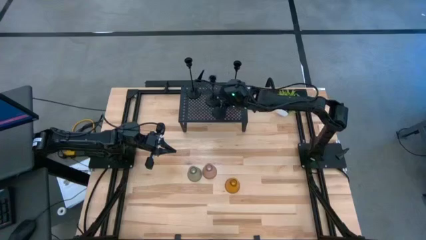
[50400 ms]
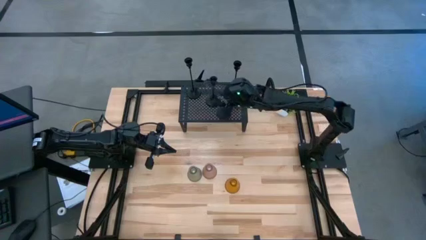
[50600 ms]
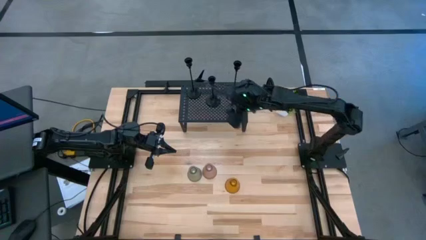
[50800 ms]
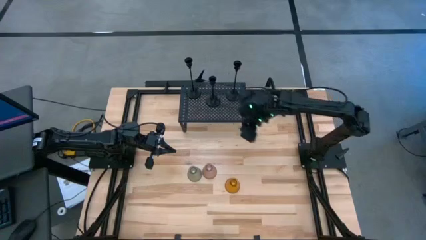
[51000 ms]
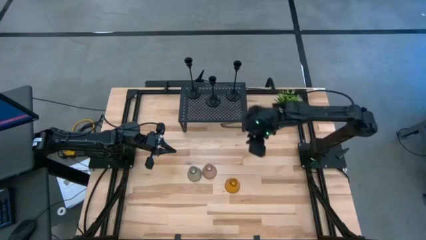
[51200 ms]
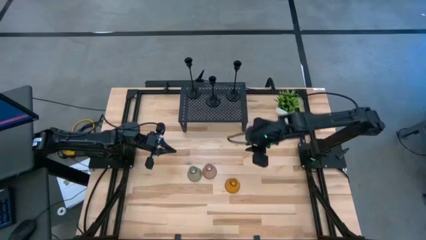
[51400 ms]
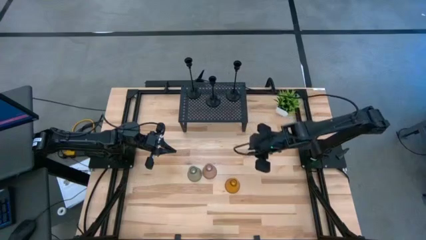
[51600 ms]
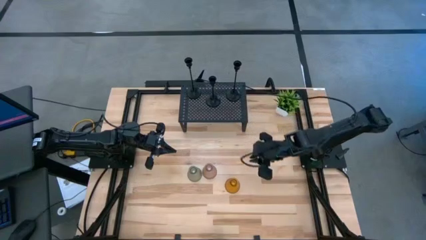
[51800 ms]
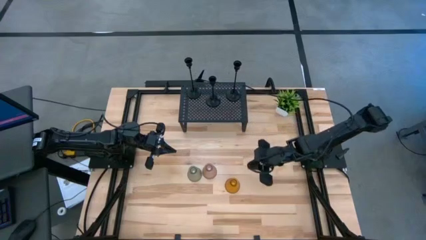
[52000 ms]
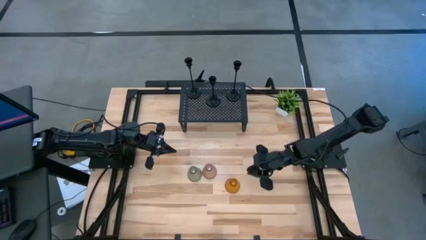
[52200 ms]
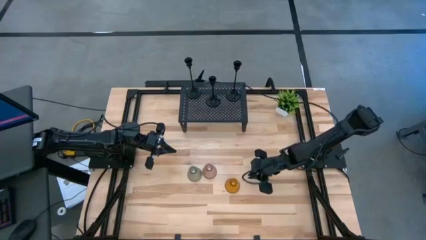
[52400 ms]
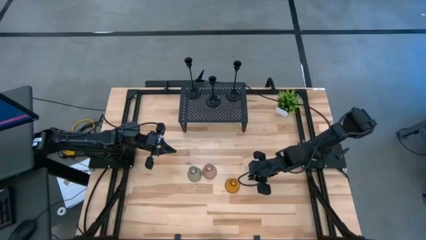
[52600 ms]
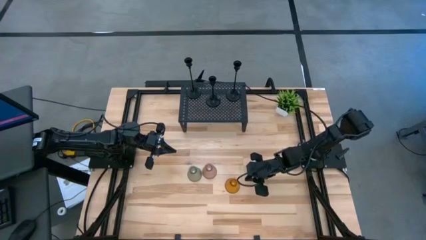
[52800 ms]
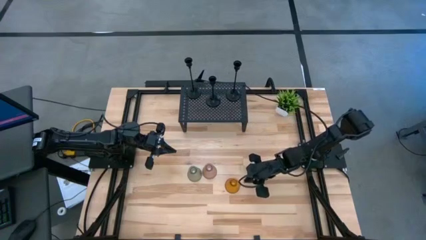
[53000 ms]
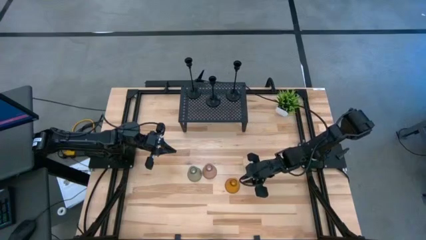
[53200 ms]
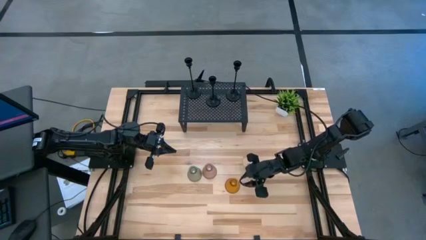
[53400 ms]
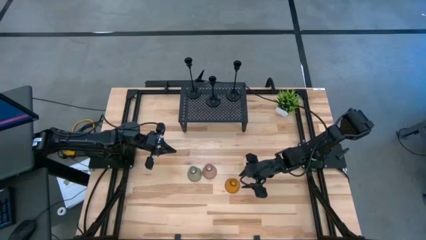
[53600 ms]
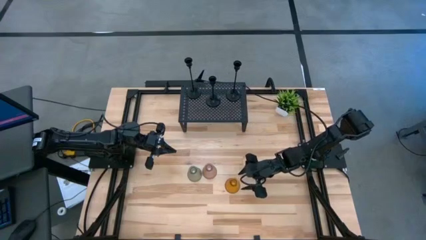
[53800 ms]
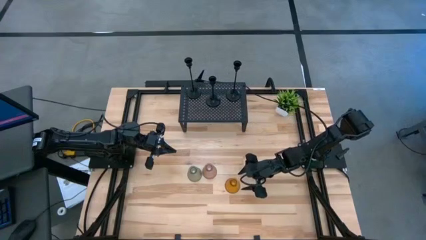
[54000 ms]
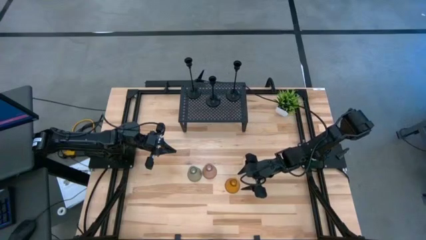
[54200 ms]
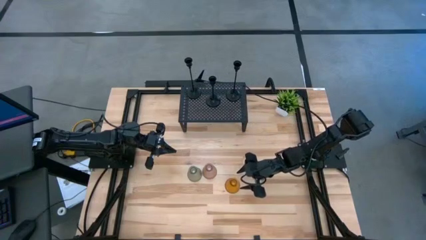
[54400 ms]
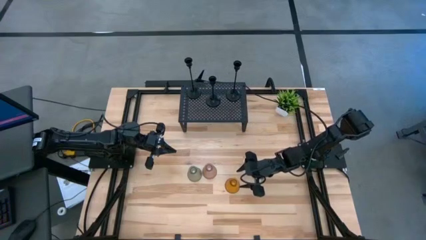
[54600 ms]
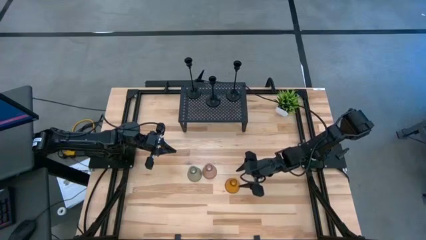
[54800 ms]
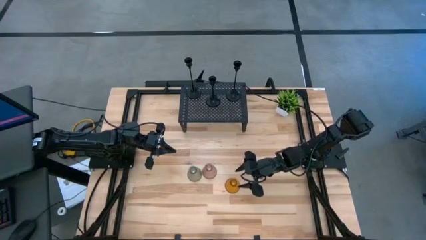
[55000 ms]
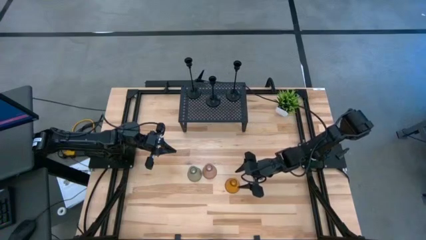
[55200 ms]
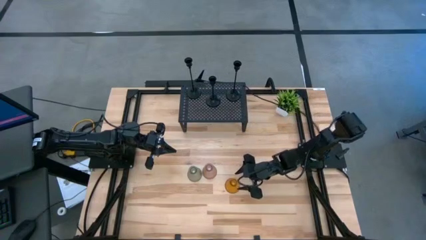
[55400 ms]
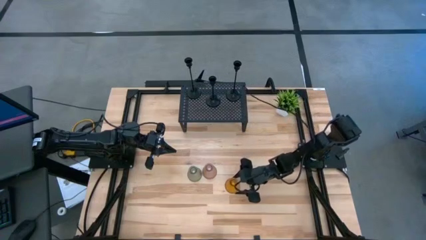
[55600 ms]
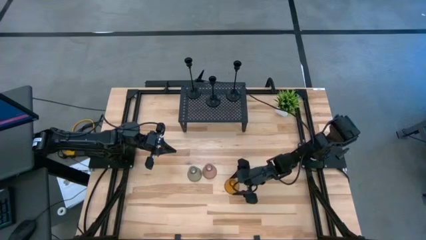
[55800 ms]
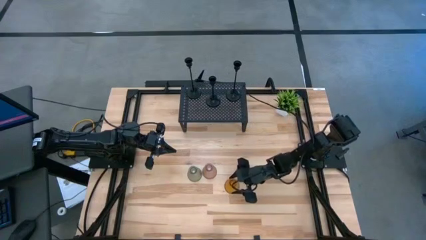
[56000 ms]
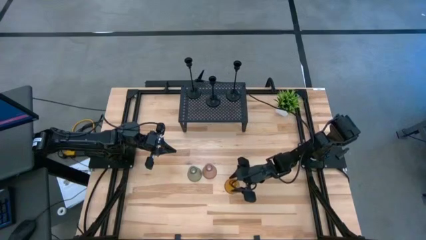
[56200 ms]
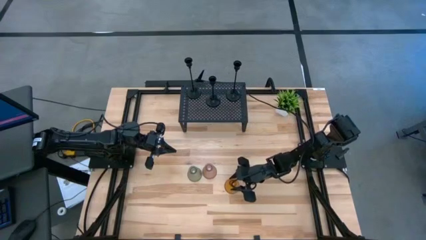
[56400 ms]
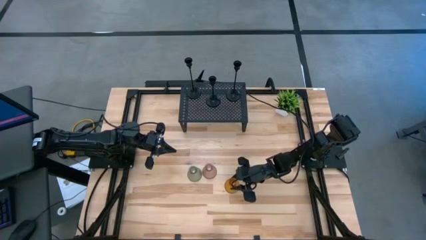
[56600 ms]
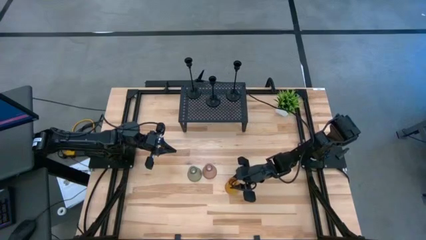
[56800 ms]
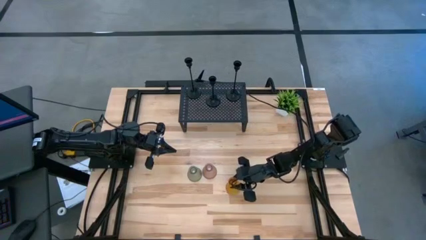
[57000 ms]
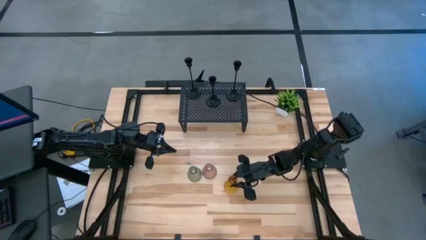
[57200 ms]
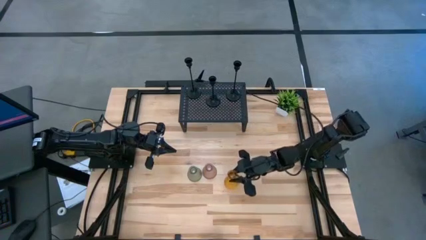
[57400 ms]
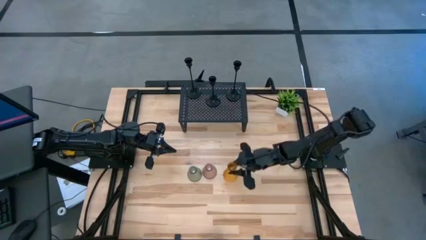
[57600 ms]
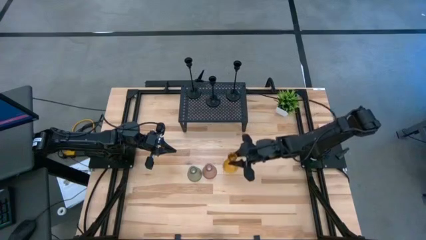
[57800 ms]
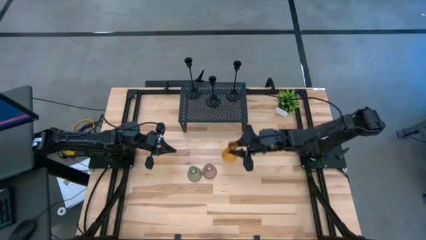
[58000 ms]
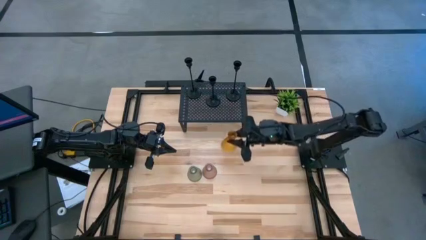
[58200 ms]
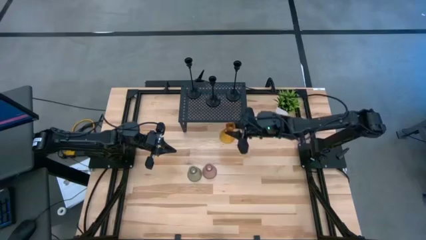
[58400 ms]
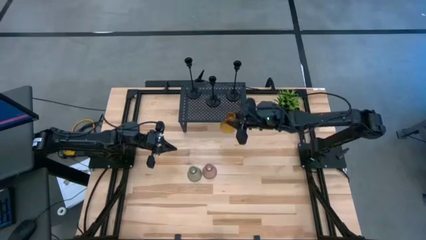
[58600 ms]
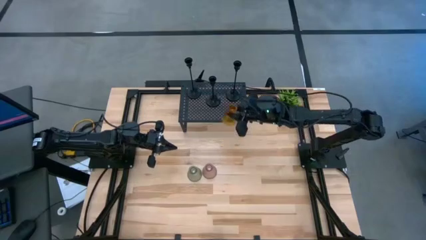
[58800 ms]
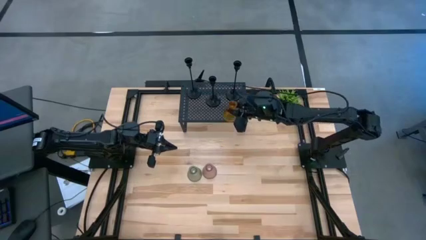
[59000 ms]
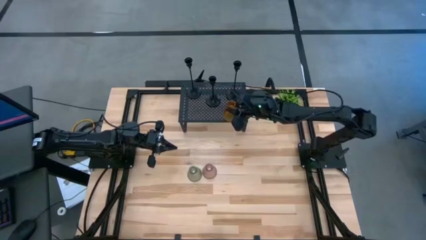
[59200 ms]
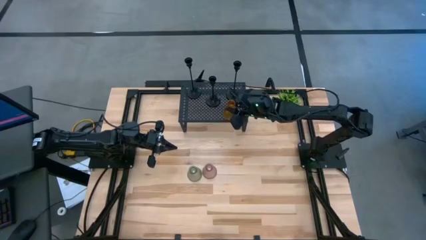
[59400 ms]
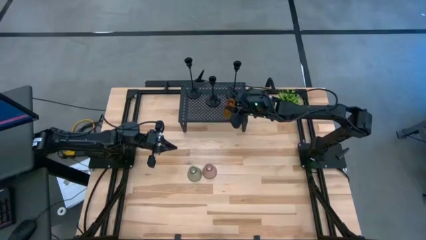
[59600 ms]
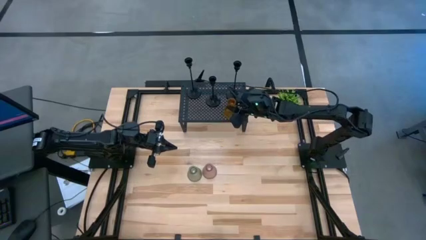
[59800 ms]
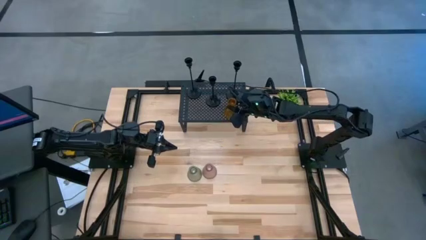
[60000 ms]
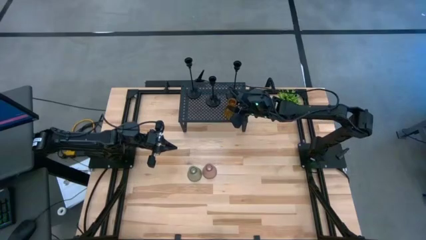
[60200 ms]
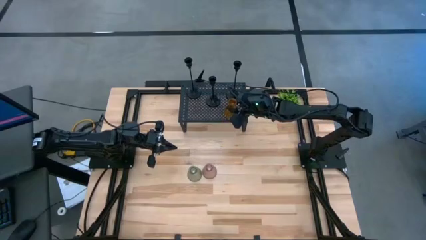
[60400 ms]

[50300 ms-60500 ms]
Task: Pick & Place candle stick holders
Put the orange glass candle holder on the shelf

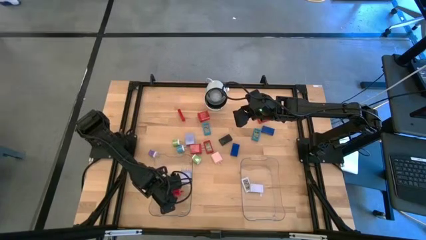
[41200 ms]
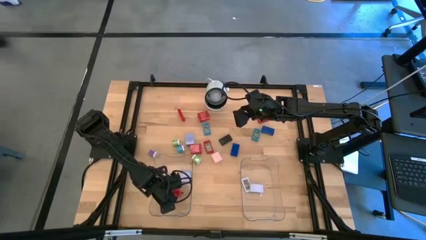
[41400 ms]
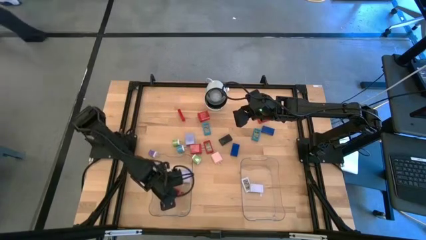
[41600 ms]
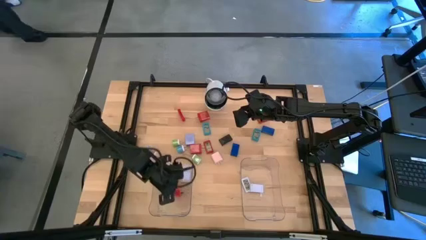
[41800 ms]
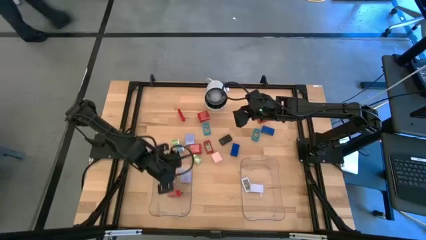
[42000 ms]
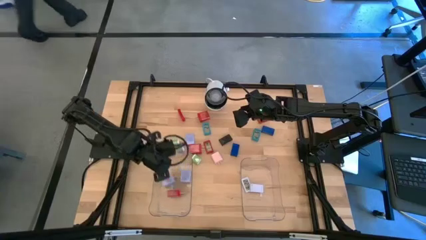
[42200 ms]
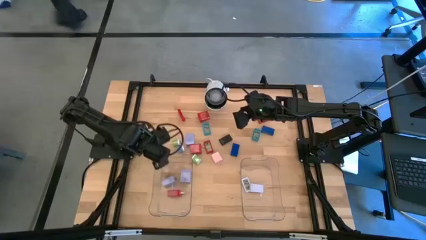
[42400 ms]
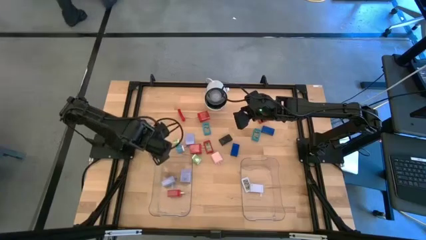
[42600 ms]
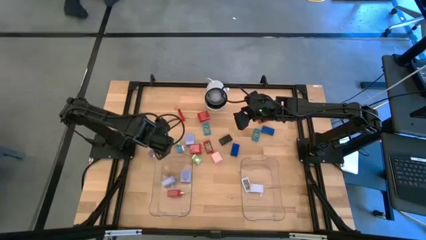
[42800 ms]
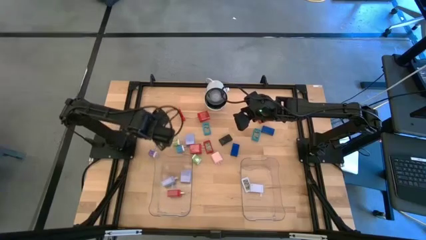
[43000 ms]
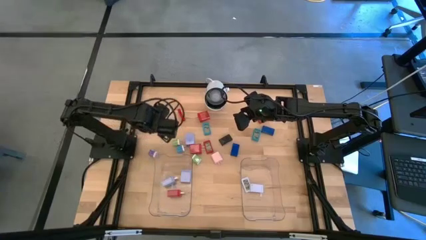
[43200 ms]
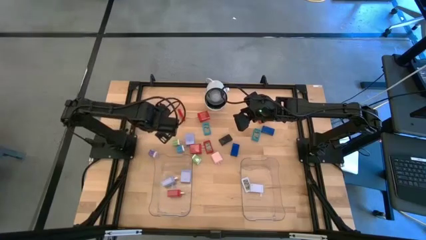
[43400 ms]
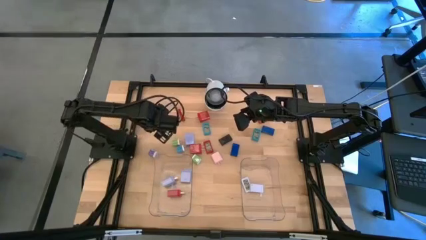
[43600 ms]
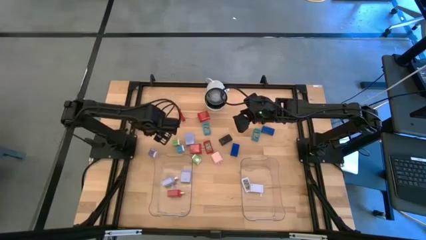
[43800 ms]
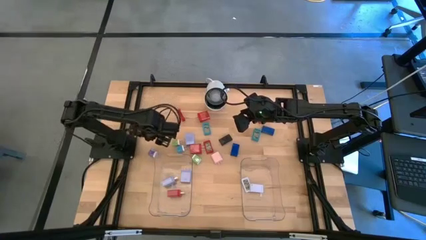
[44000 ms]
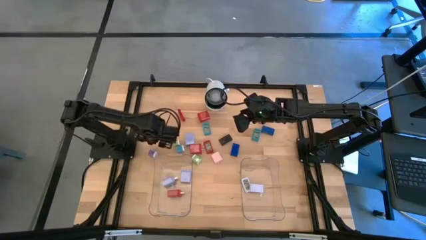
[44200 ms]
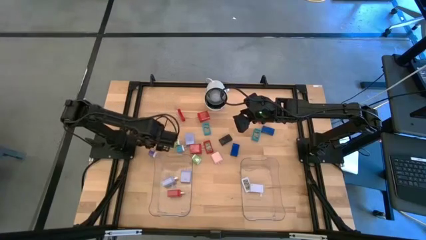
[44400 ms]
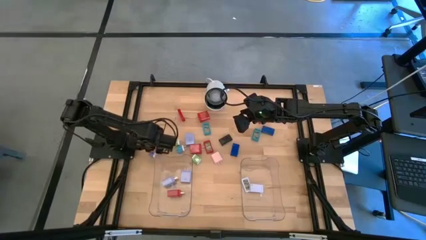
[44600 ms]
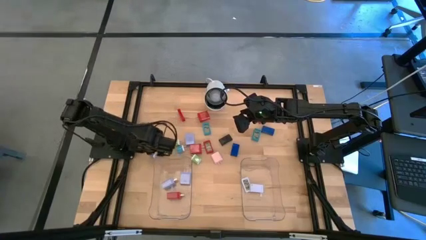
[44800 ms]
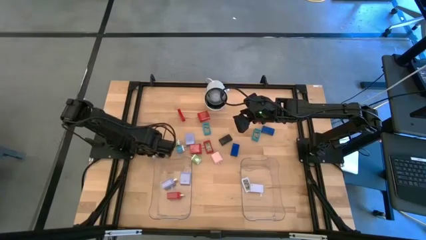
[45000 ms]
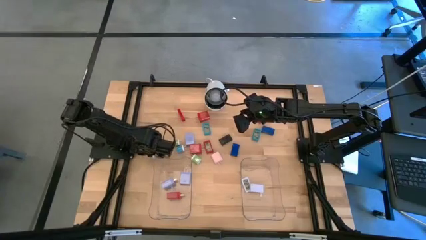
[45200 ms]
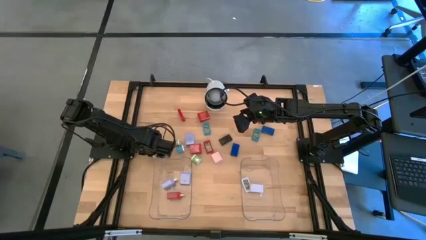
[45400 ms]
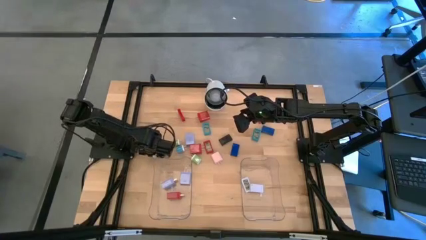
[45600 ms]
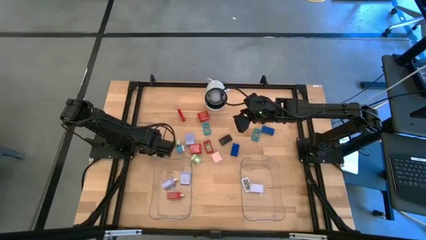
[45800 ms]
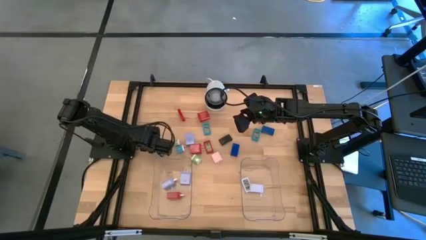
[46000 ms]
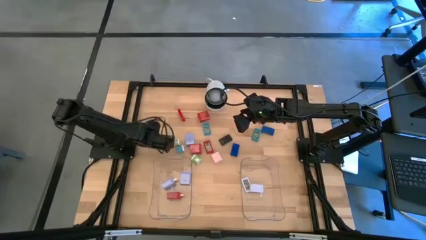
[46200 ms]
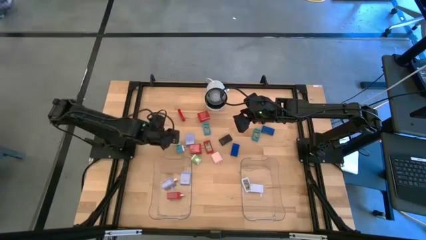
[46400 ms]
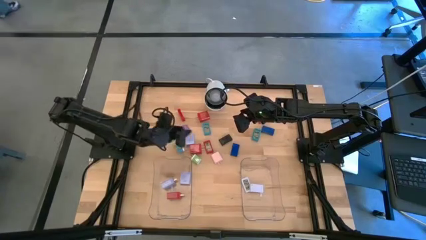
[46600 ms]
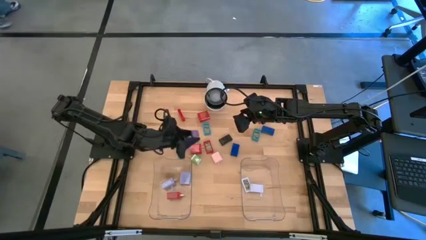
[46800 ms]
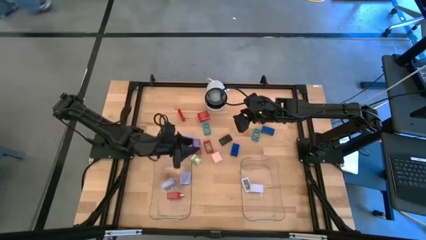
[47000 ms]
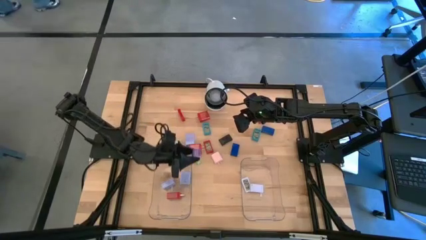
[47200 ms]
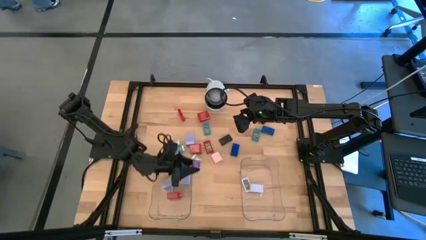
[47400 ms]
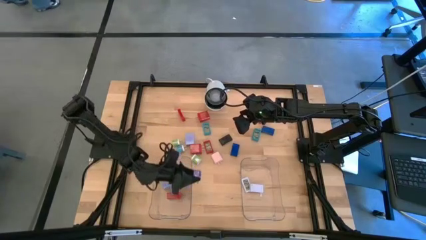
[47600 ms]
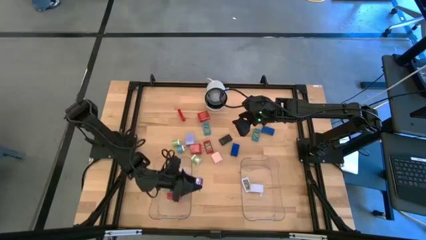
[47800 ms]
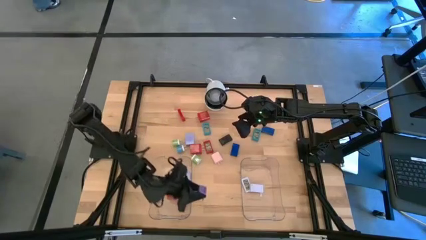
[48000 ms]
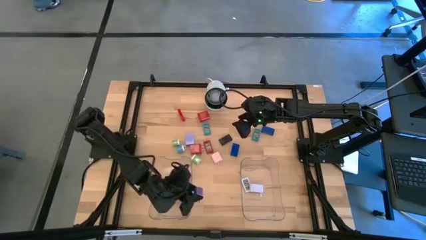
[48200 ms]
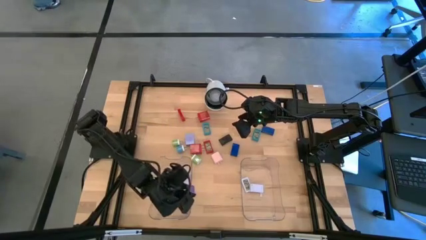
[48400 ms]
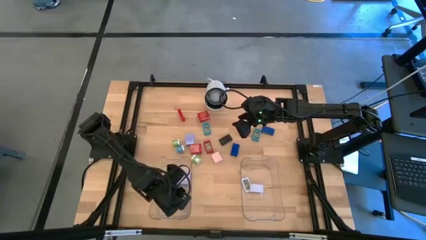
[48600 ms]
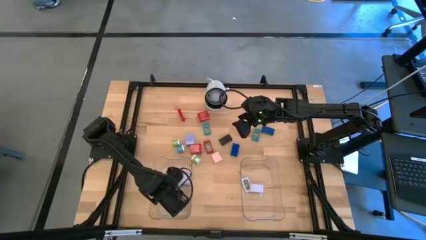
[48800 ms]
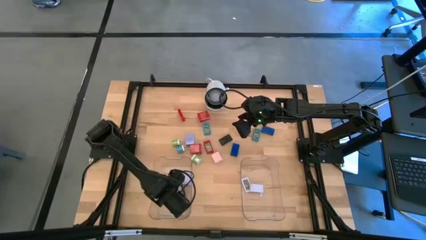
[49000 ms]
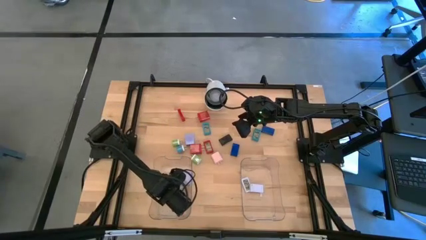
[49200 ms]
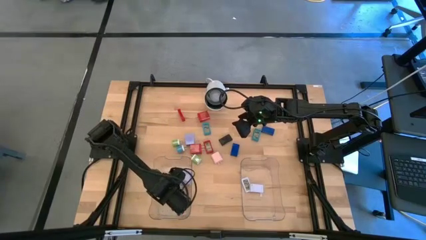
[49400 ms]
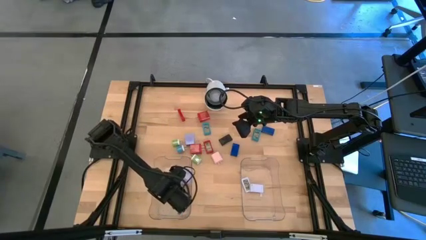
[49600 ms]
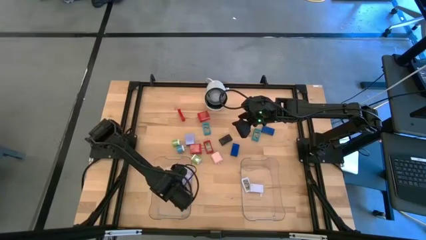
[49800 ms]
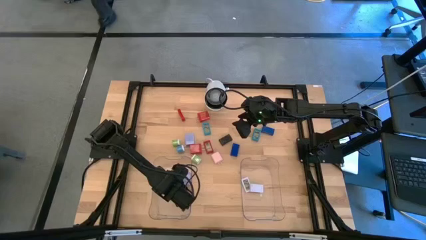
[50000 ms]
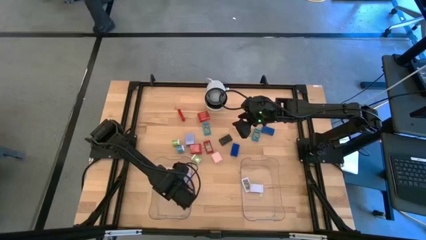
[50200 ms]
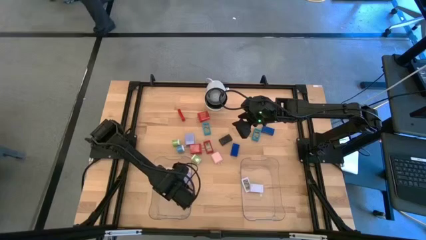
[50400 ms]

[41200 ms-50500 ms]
Task: Pick & Place Office items
Put the violet charger adapter into the left transparent bin
